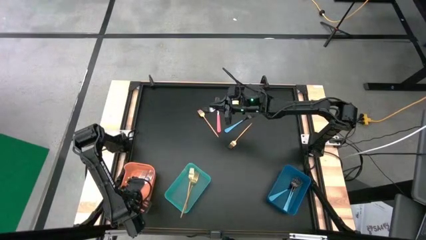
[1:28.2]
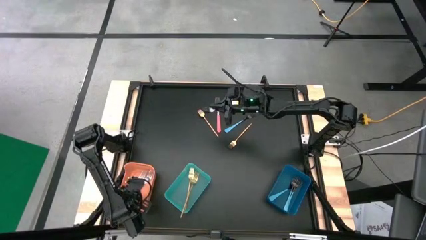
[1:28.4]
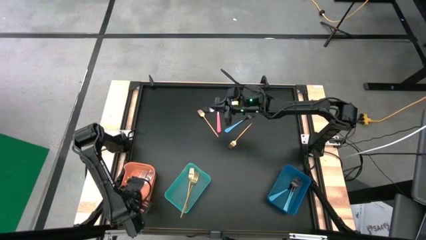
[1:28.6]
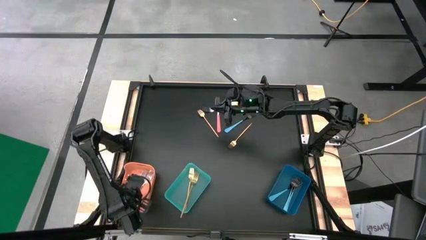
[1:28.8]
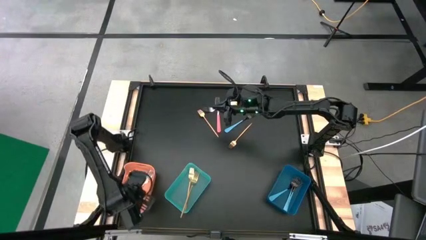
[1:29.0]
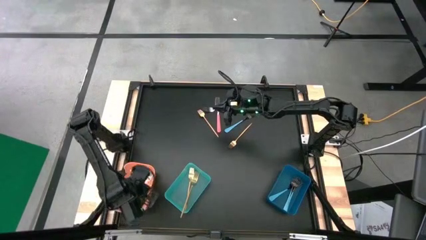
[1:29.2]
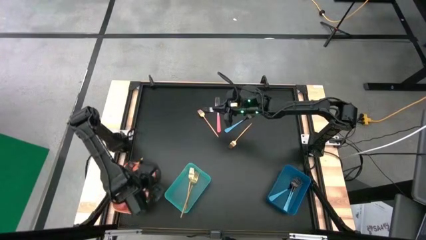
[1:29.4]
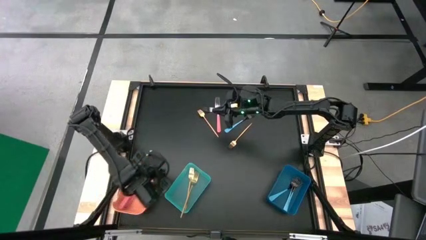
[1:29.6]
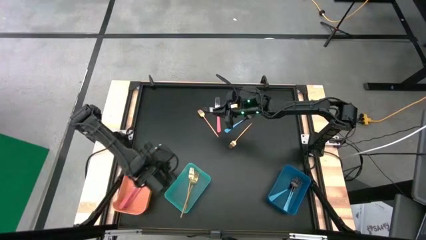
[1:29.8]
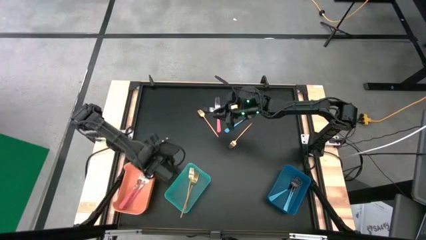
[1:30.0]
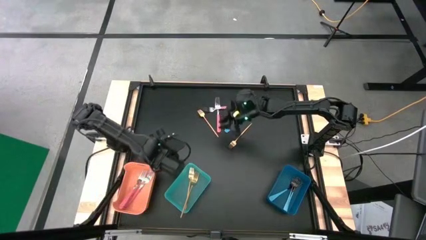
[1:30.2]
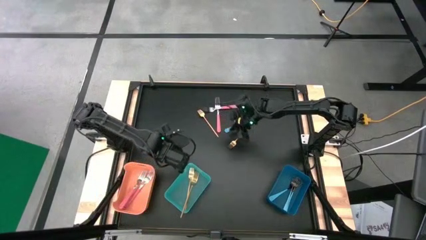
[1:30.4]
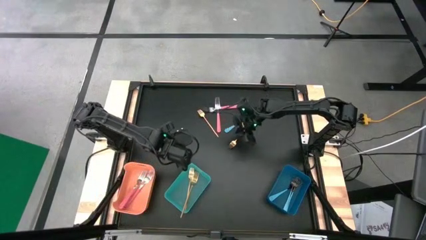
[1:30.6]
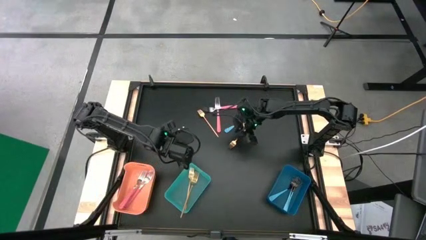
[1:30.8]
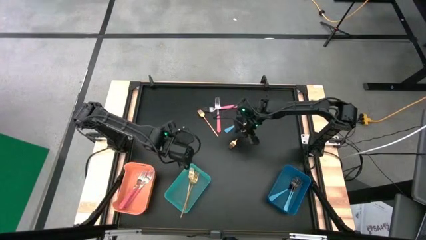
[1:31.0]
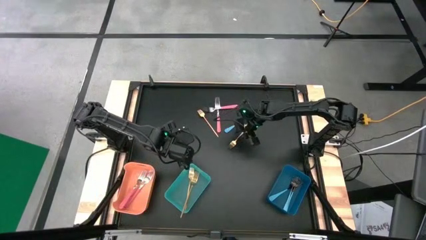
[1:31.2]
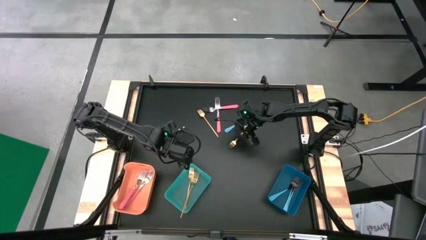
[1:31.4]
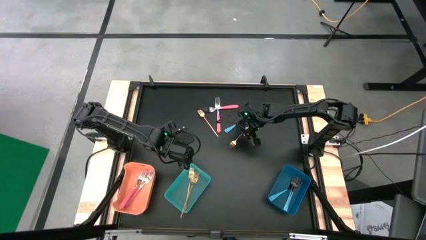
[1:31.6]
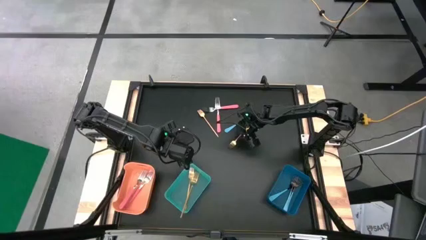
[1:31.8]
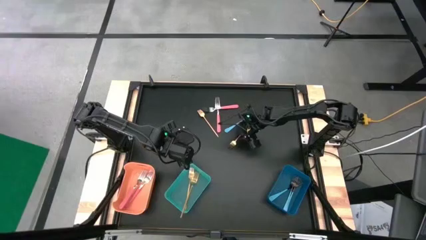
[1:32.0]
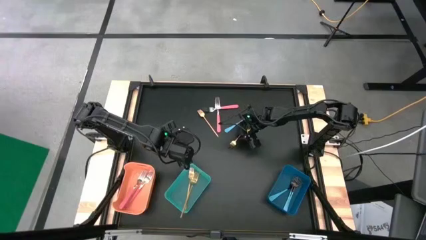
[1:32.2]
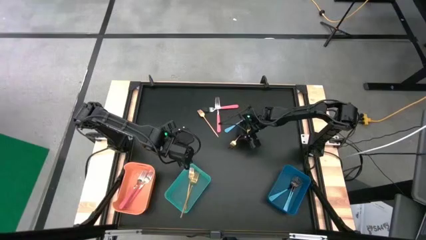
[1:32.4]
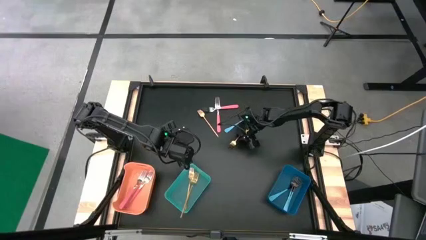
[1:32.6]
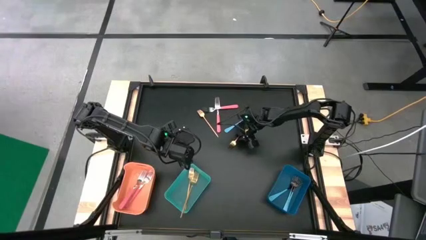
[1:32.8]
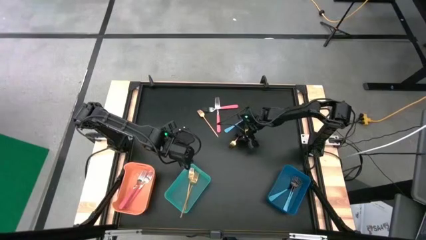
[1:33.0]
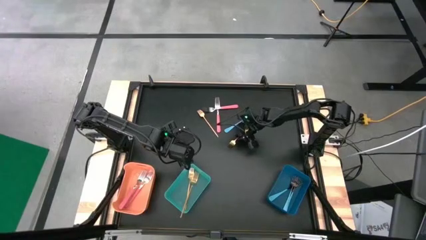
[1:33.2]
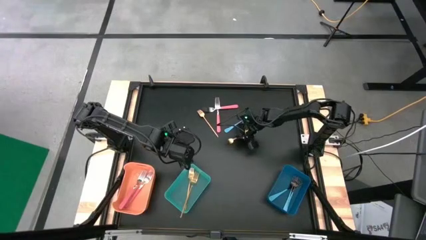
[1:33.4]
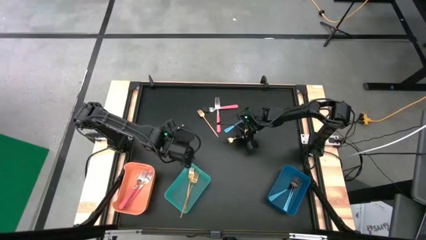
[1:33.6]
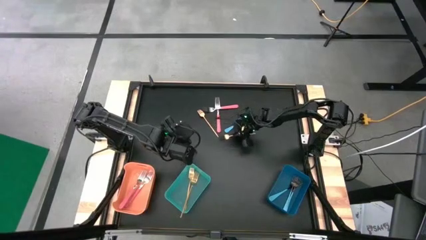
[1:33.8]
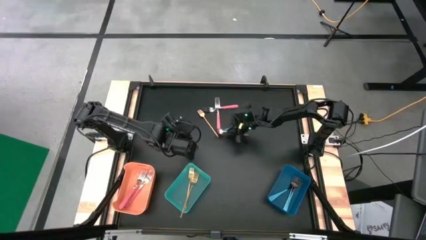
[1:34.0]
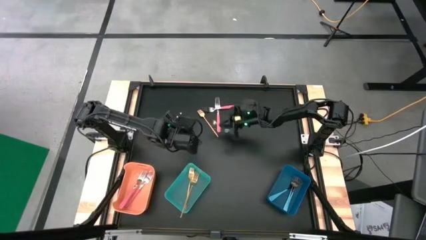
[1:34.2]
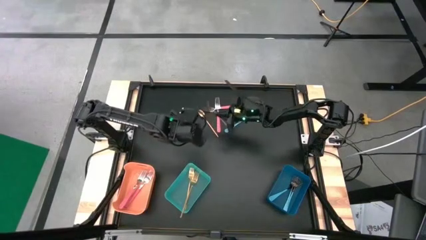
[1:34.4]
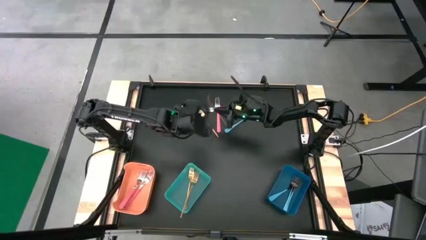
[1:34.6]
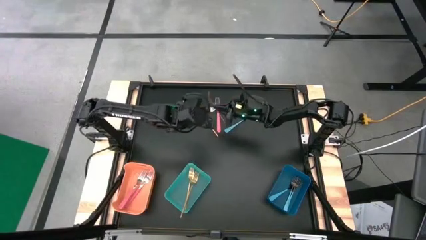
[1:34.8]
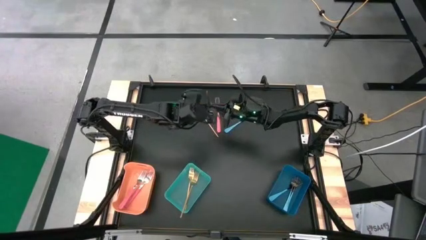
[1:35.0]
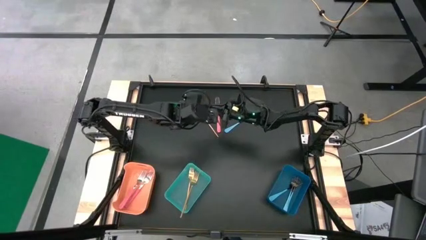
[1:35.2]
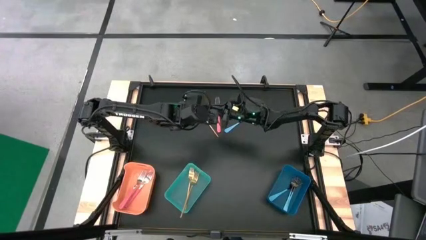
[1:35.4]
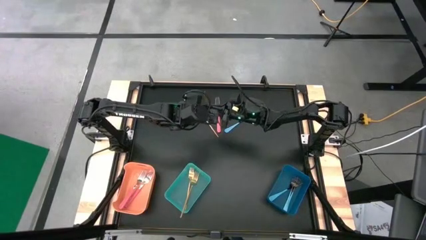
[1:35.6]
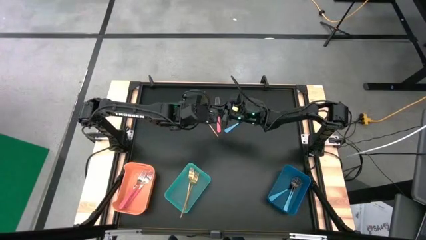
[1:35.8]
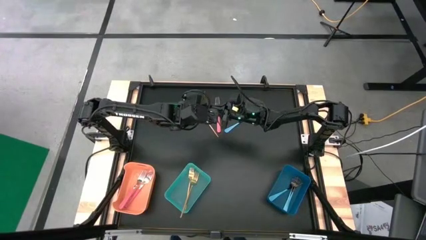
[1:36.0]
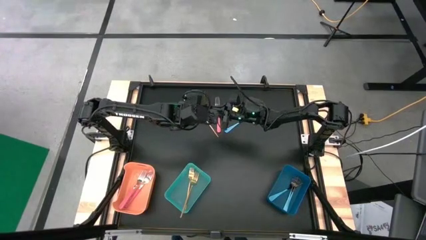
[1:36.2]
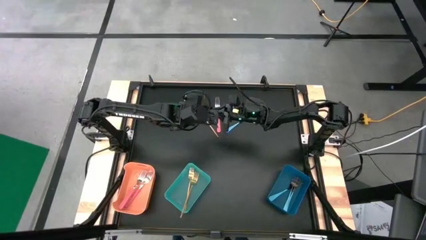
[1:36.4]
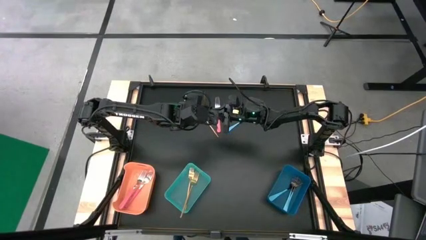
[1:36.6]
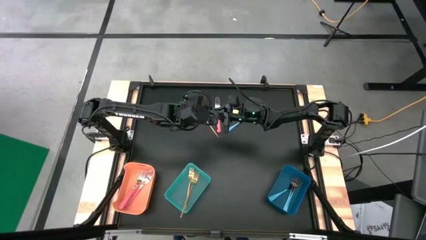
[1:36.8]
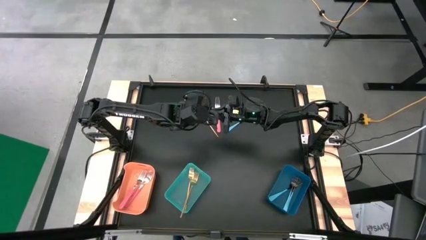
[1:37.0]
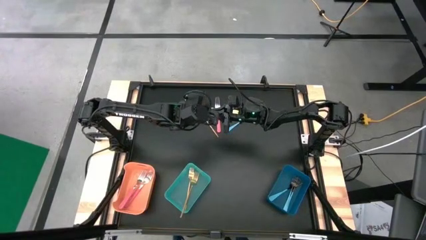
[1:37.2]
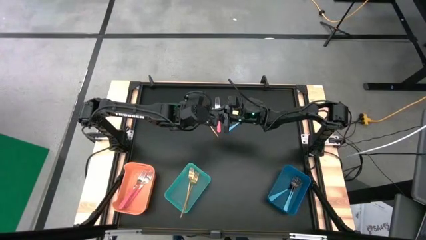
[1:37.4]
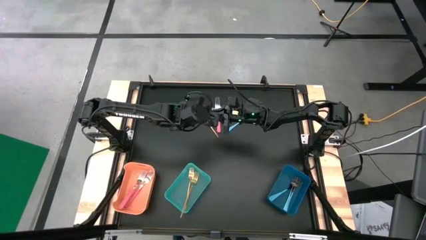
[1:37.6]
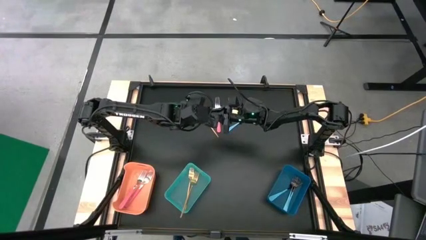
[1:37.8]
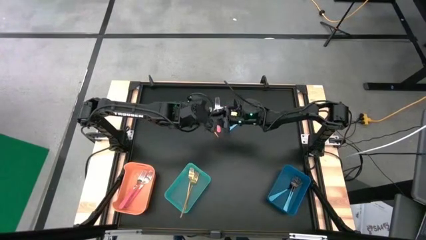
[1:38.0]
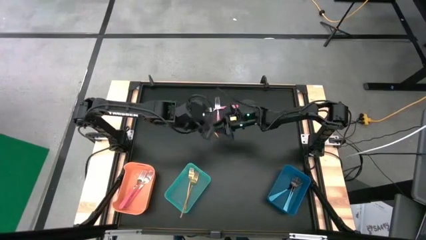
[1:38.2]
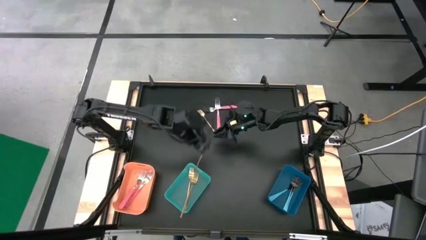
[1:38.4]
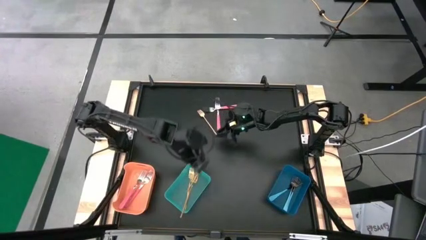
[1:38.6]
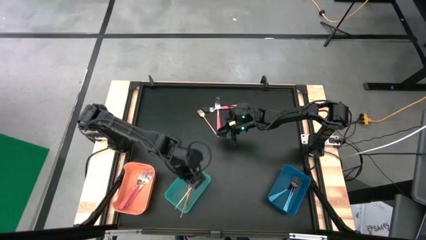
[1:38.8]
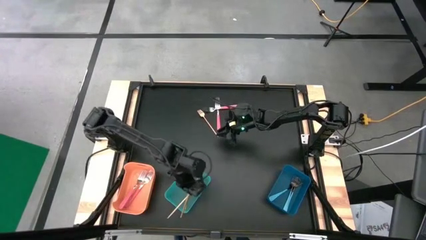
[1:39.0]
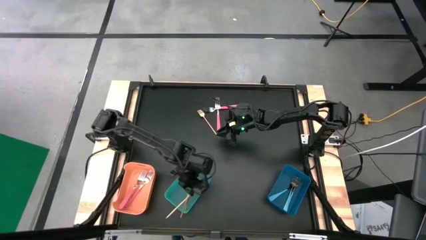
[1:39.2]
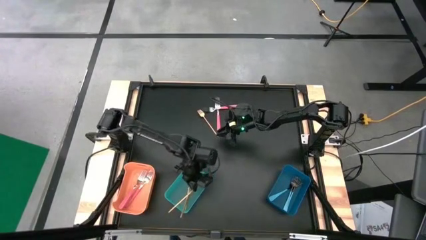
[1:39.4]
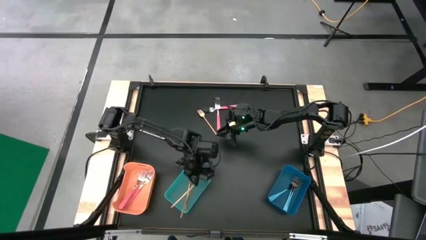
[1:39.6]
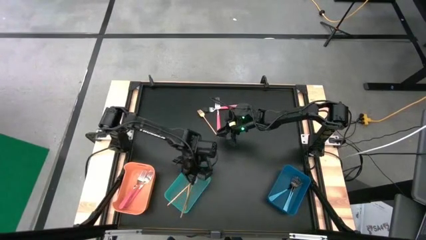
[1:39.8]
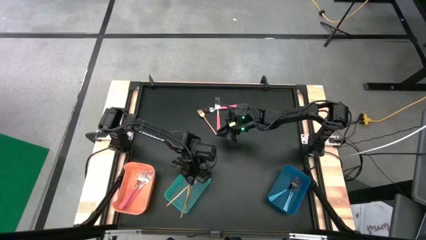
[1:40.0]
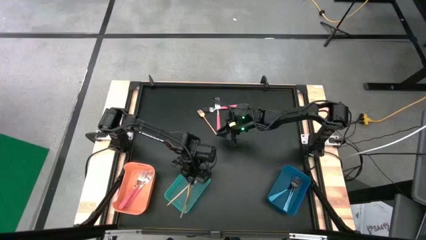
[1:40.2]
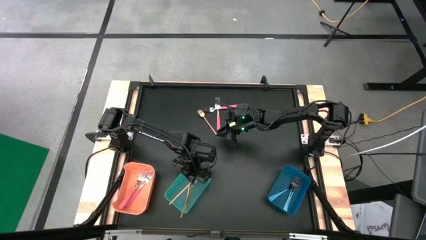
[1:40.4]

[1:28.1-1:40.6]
Task: Sort silverware by color (type)
Put the gold fork into the green bin

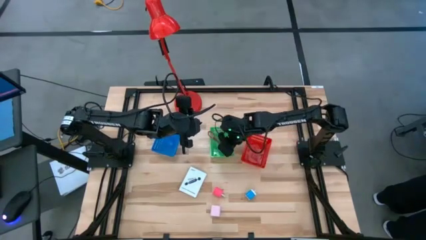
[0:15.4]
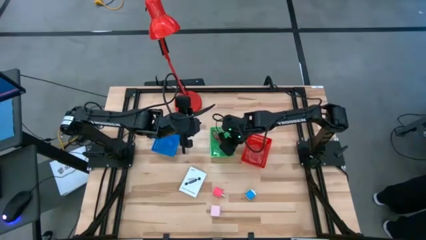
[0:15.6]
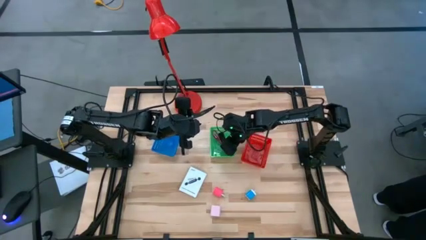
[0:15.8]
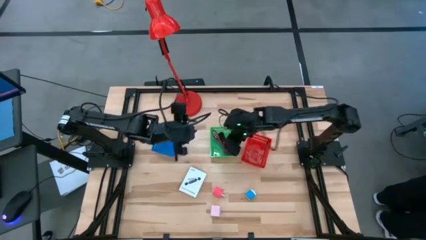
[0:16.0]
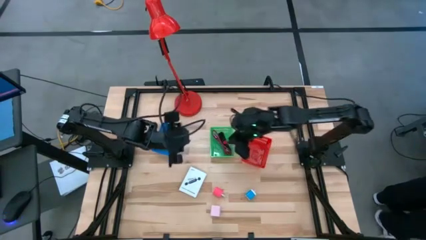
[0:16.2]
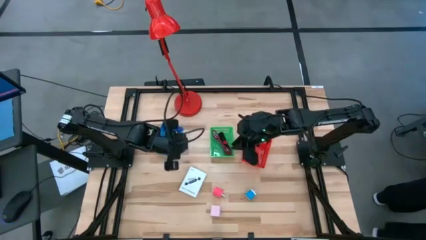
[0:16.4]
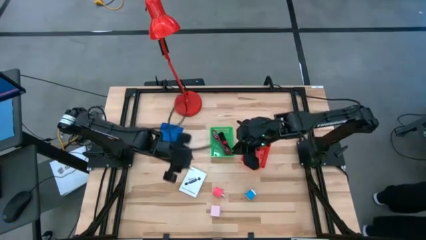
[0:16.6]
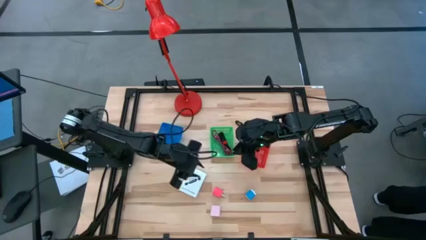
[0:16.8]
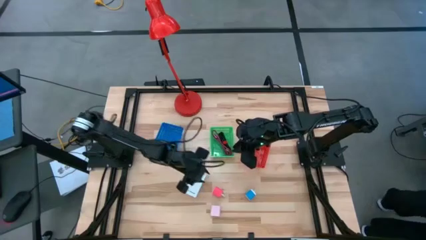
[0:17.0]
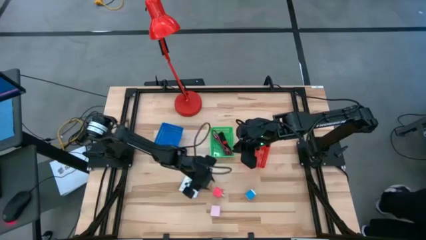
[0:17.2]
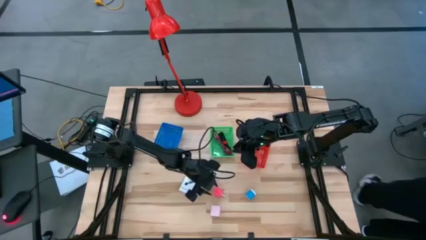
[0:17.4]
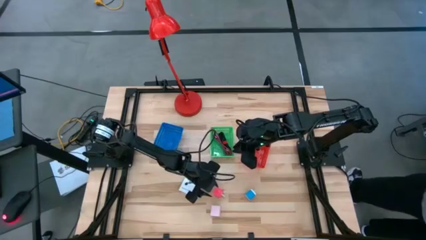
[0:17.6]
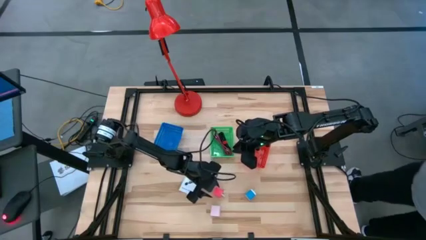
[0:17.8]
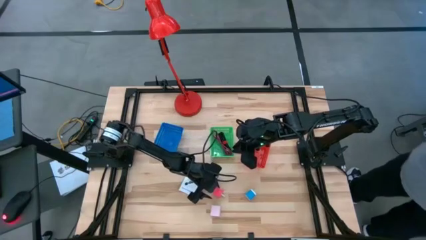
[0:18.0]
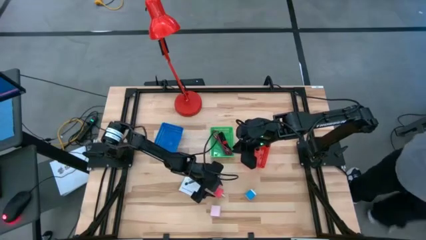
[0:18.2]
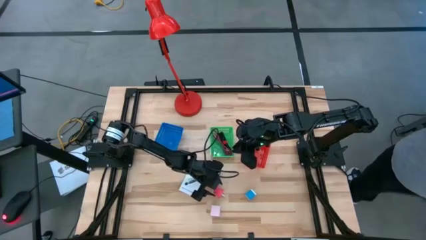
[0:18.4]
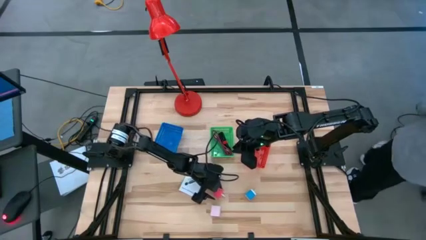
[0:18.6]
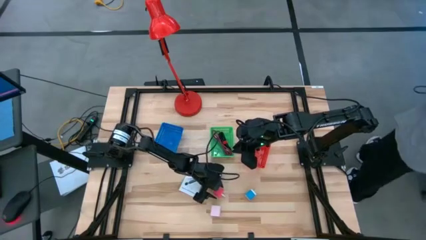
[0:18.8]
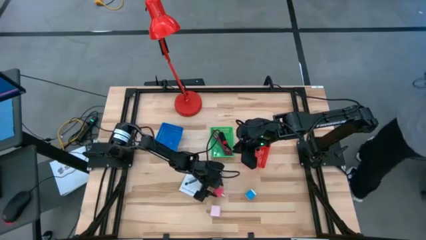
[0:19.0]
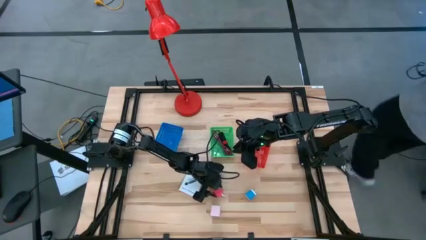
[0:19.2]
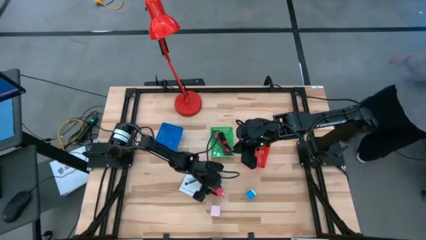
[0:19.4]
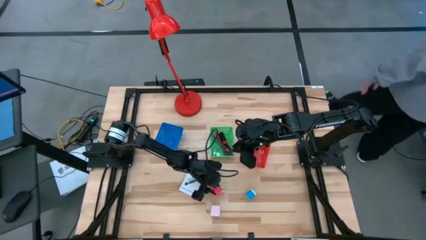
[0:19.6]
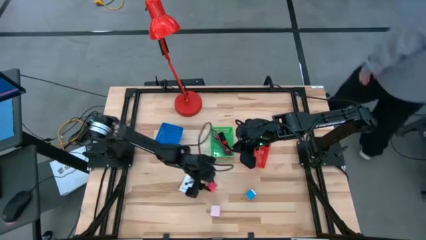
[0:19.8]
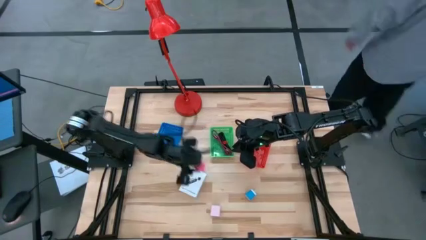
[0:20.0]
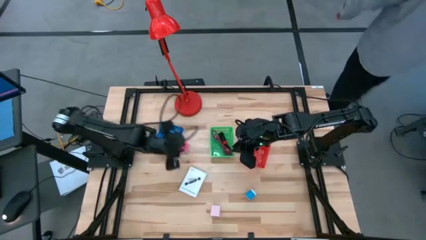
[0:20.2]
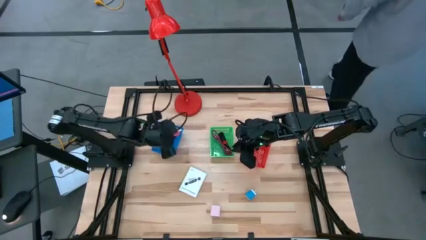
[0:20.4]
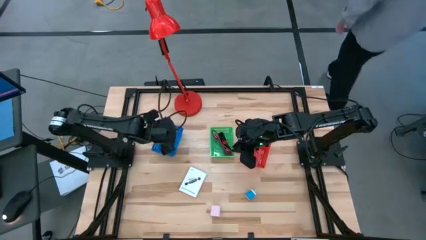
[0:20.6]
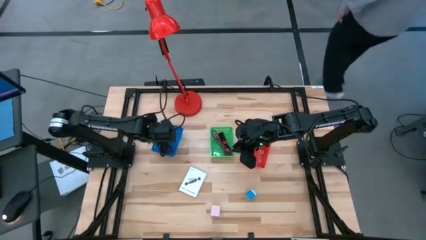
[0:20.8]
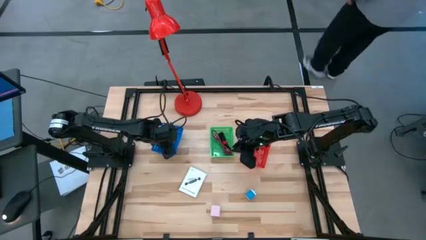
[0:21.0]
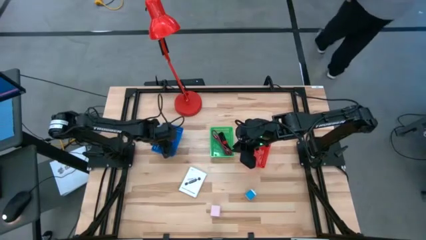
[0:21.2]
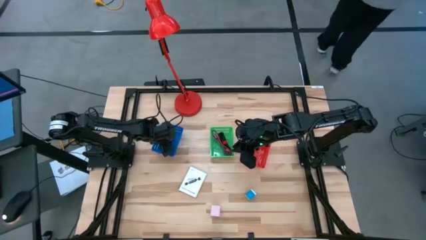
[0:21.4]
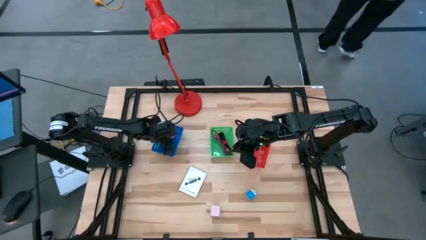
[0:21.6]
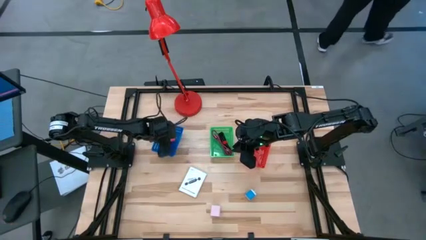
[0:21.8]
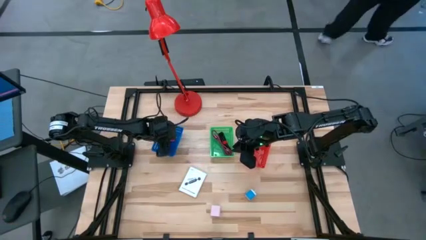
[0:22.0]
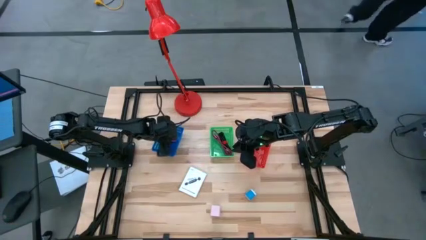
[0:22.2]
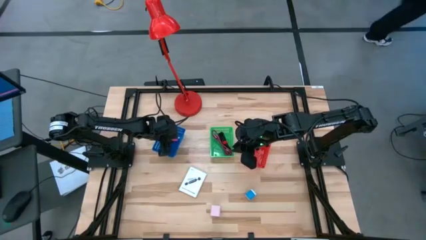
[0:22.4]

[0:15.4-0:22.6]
Task: Pick and place items into bin
Put the pink charger adapter into the blue bin
